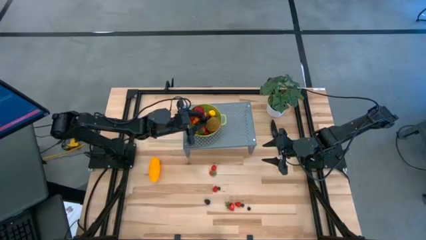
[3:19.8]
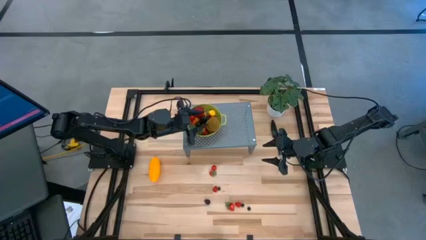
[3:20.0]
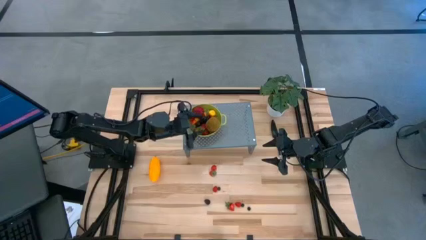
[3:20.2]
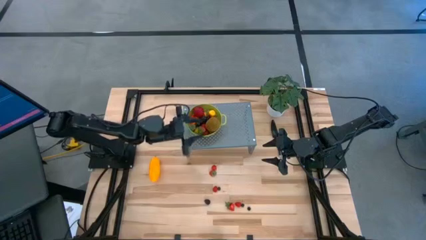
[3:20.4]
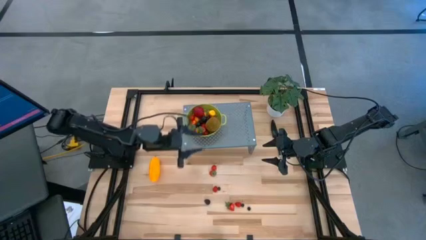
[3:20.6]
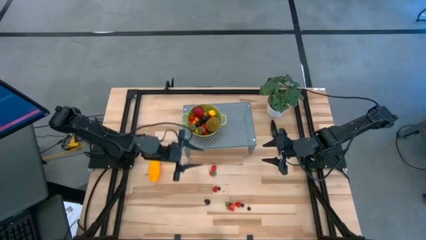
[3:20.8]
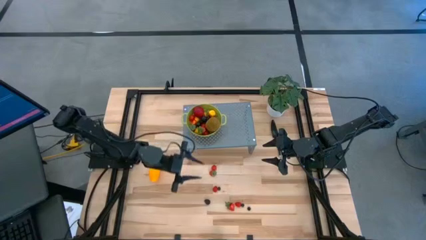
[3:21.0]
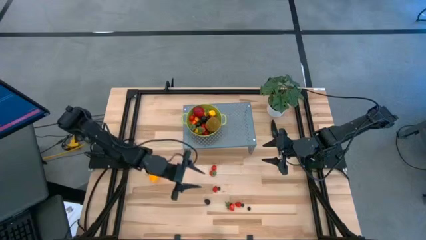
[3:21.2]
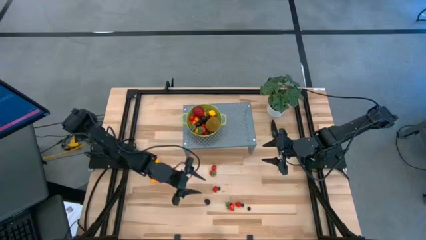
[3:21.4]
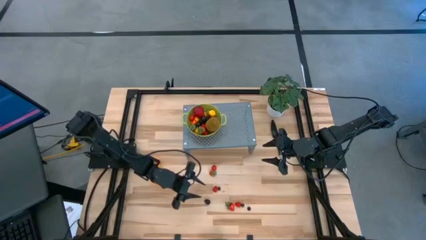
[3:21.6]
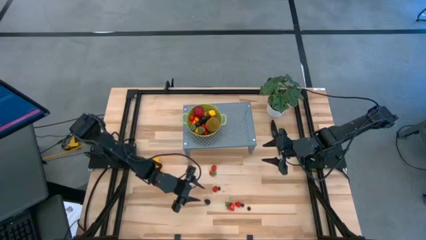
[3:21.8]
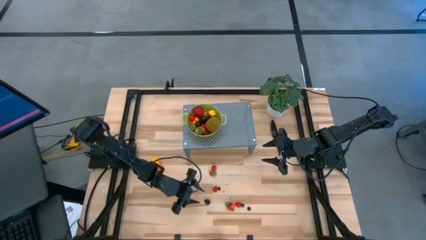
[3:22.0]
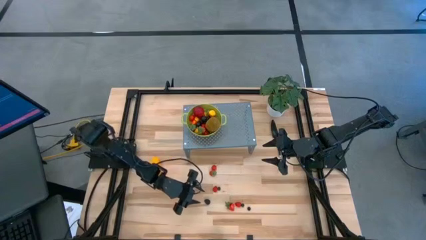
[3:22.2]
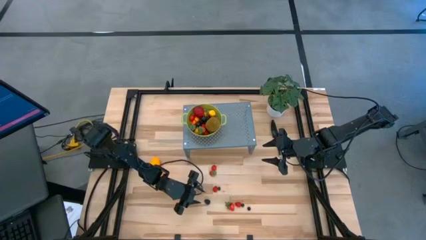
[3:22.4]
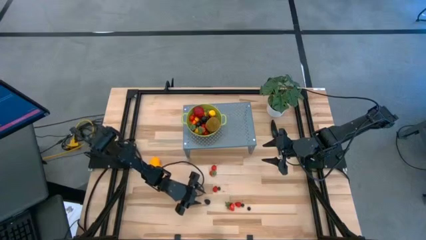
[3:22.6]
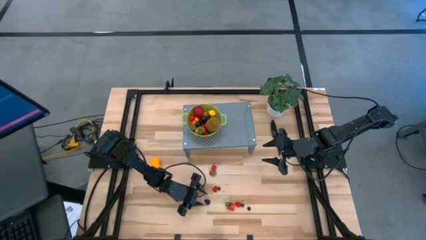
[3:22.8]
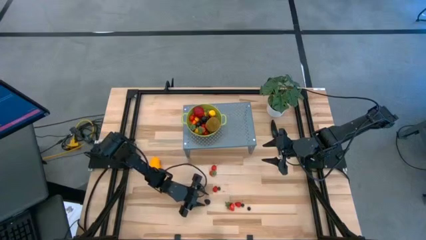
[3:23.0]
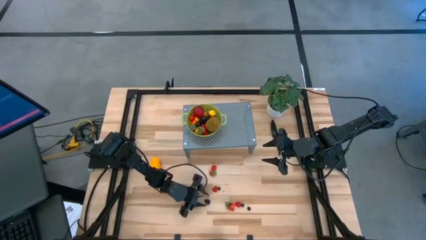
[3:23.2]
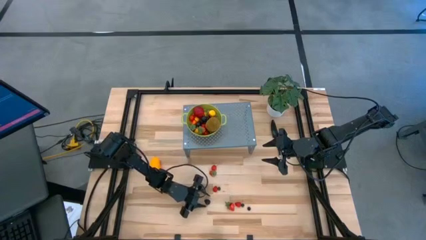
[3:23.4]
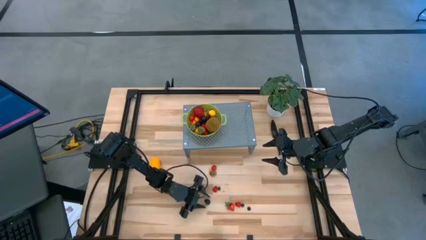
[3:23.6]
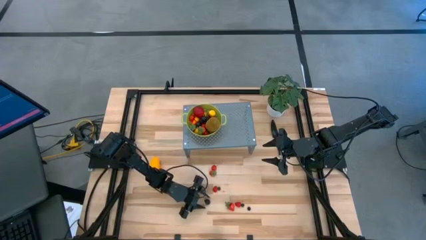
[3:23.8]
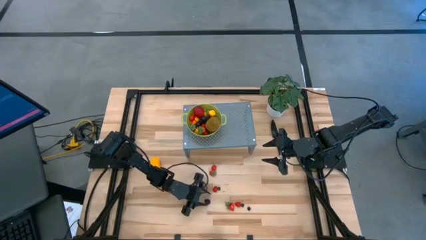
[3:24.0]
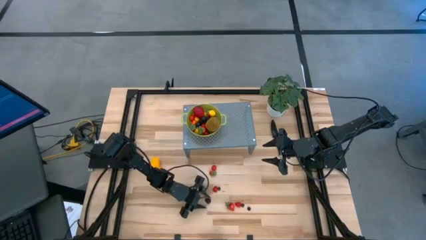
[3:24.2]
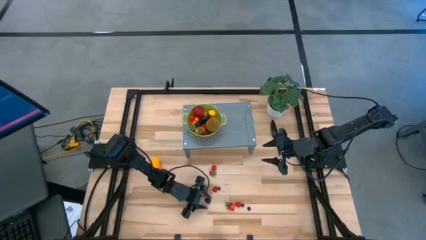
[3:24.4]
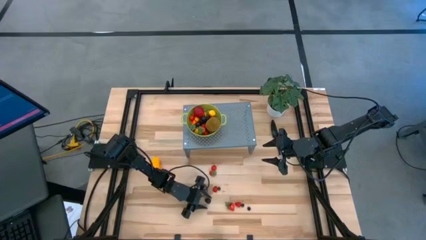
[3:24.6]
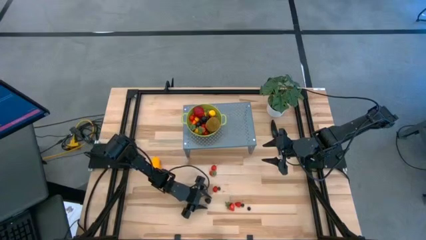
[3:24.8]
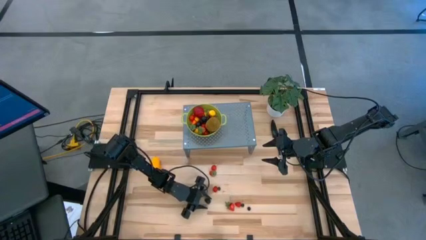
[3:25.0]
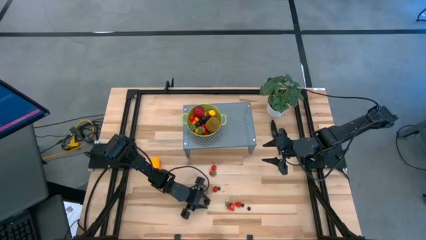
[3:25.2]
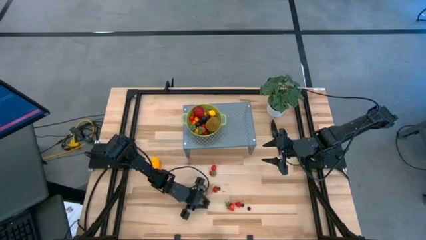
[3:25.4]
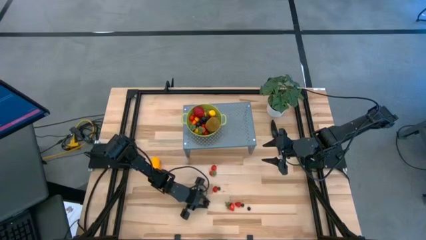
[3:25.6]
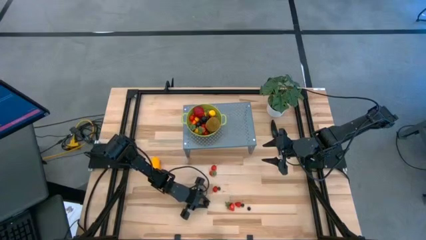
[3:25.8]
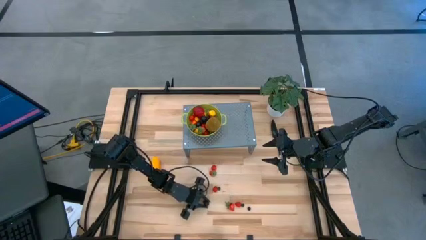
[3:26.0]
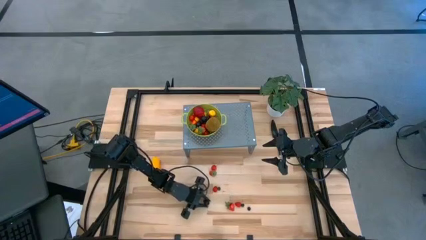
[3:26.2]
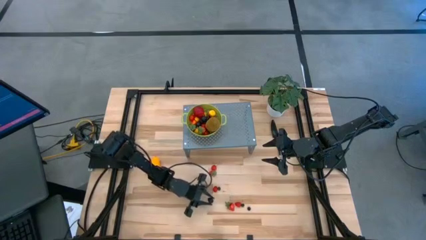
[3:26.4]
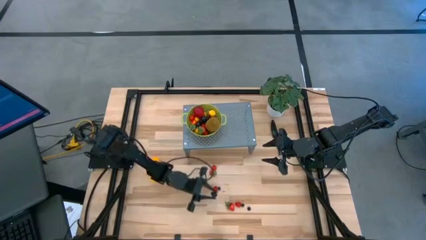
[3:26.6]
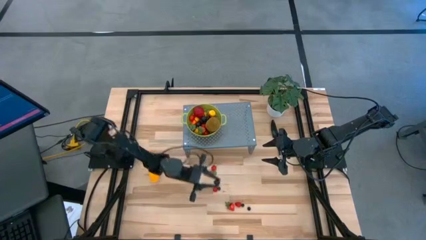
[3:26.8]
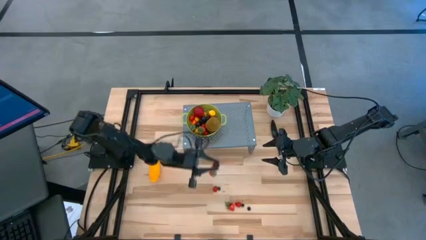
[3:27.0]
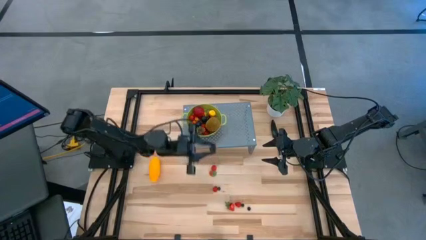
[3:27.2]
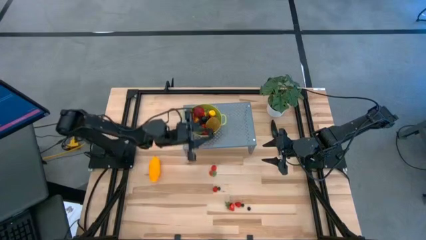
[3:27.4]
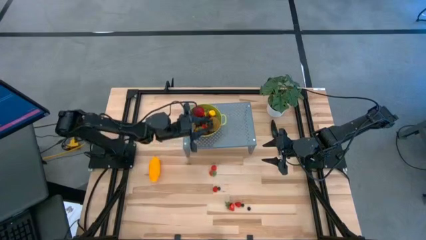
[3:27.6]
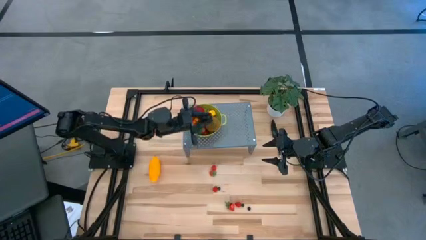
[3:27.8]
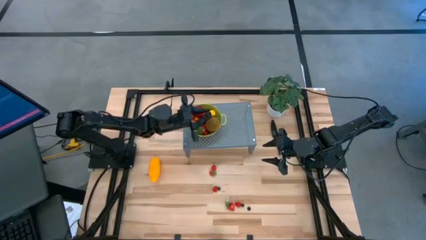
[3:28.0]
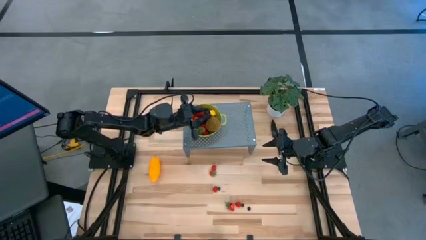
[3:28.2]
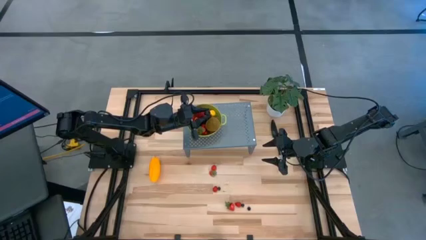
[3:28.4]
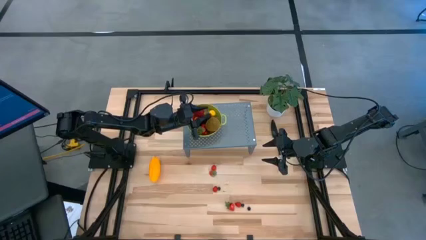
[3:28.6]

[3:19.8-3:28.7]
Task: Pick & Place Fruit
Put the black raspberry into the green strainer bowl on the shelf

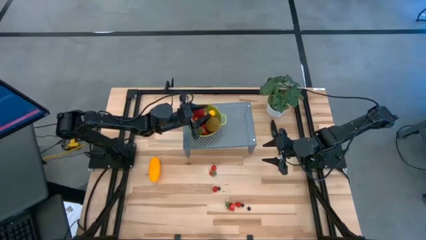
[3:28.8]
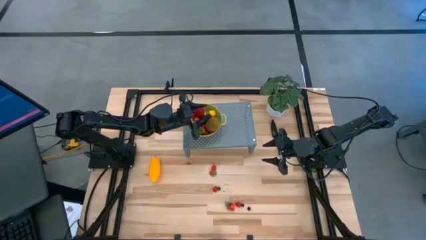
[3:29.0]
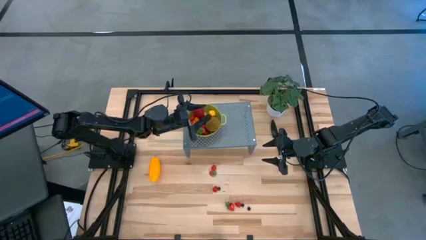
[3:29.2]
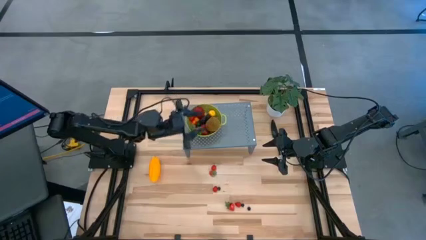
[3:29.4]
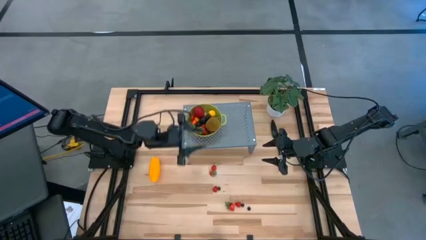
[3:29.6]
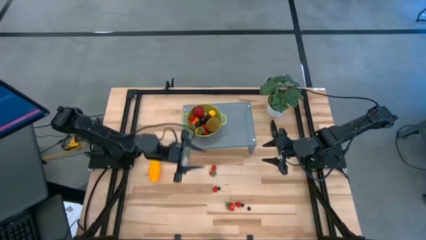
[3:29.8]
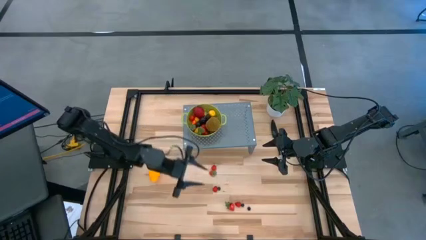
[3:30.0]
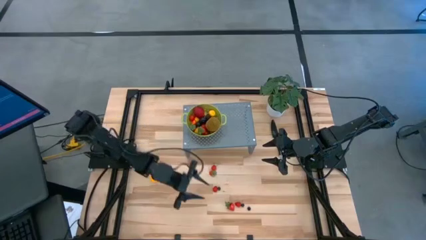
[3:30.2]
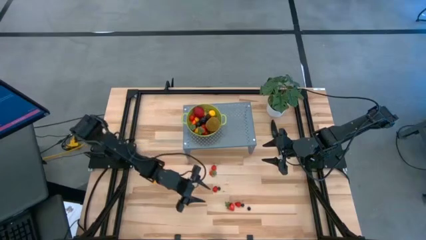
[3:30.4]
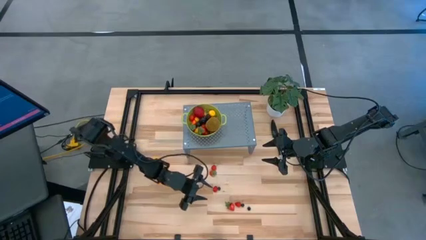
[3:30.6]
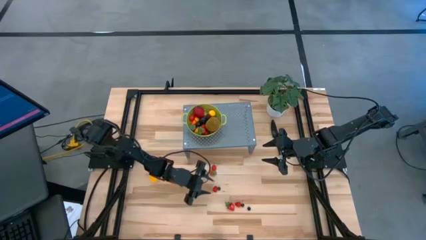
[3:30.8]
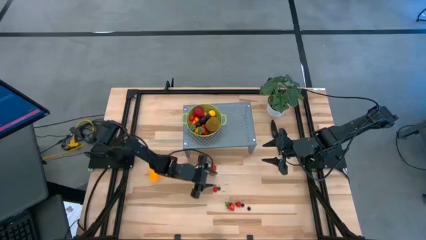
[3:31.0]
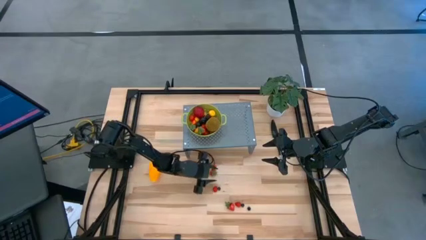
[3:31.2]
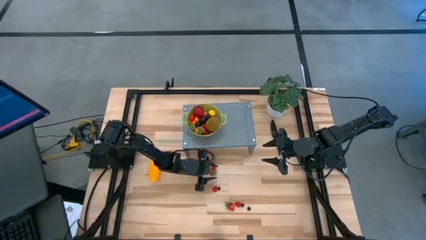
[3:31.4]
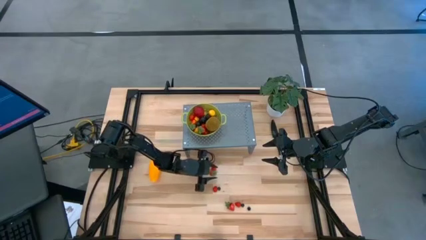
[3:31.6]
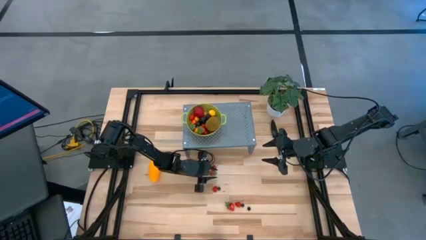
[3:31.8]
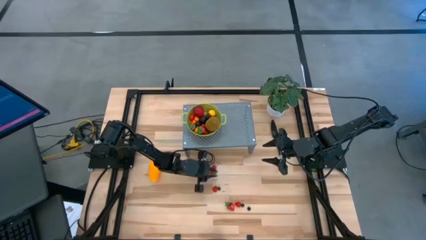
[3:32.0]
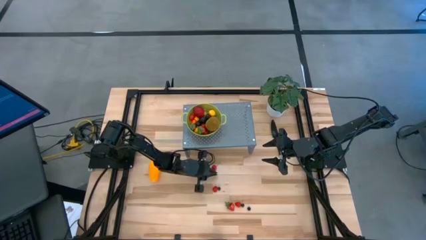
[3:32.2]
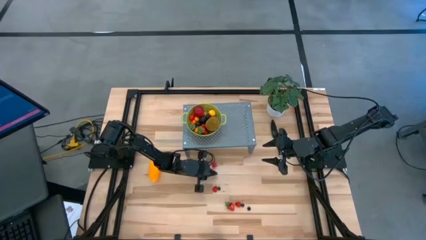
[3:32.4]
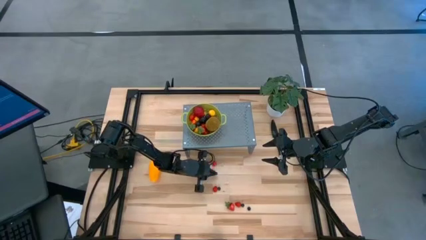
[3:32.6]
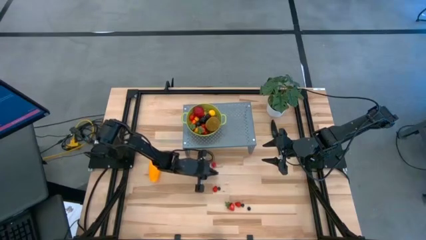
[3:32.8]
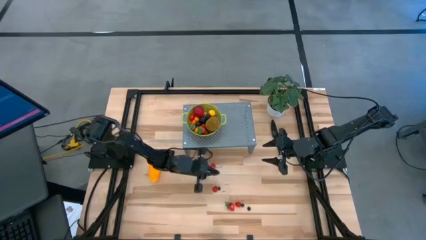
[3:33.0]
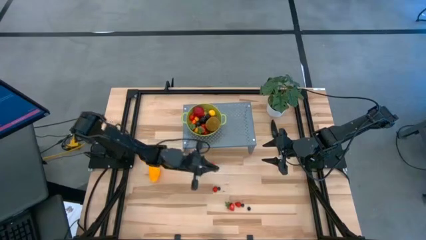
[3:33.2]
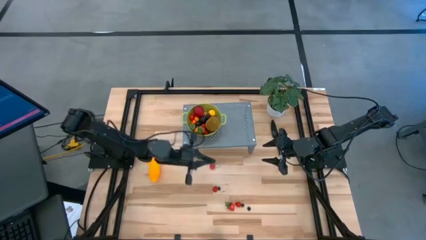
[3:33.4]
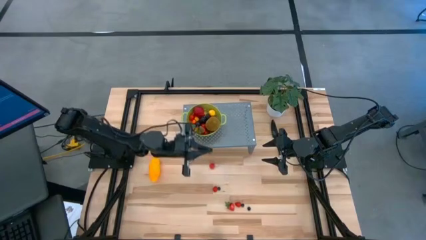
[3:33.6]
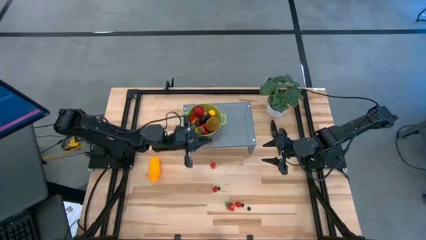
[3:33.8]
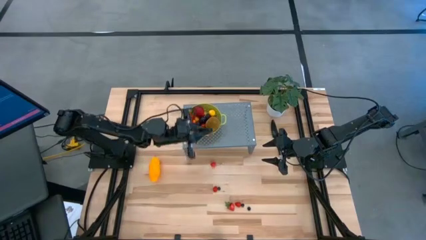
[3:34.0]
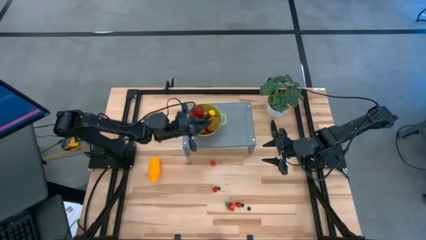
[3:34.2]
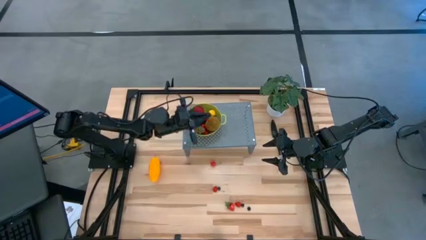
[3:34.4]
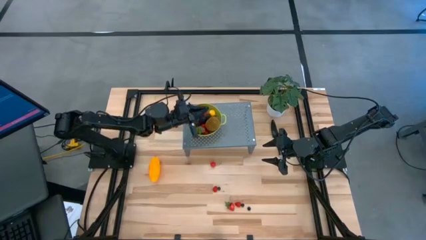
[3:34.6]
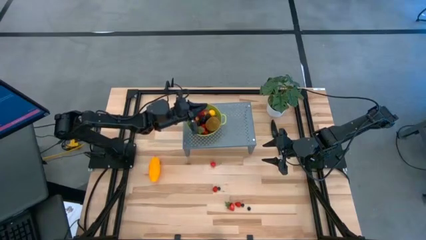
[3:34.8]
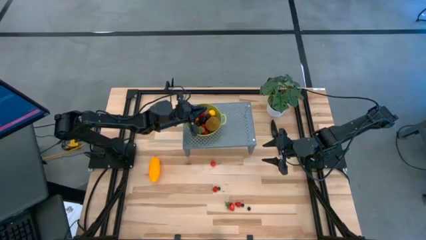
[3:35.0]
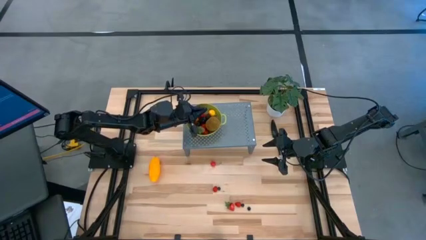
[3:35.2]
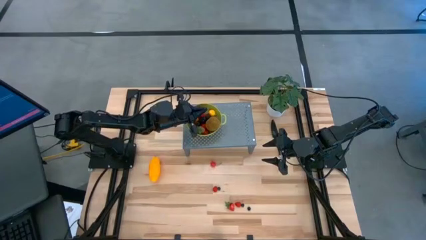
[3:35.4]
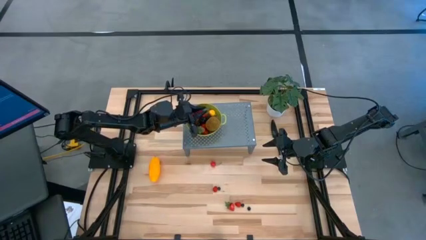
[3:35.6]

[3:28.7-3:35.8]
Put the strawberry into the green strainer bowl on the shelf
